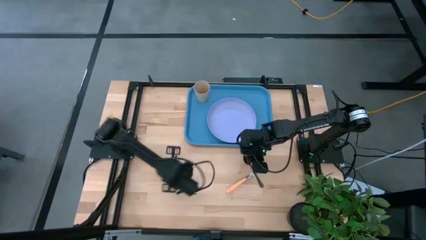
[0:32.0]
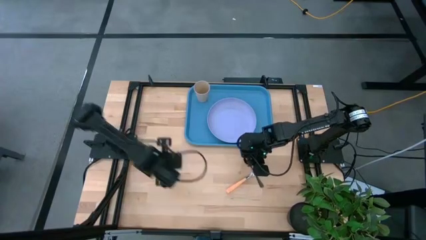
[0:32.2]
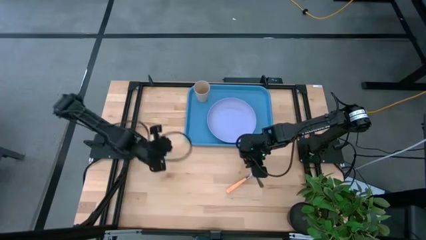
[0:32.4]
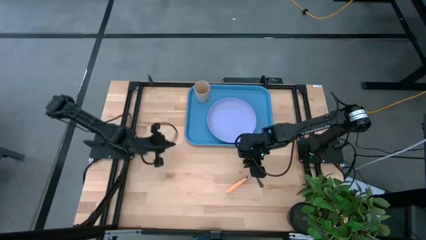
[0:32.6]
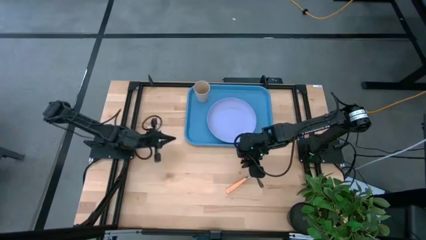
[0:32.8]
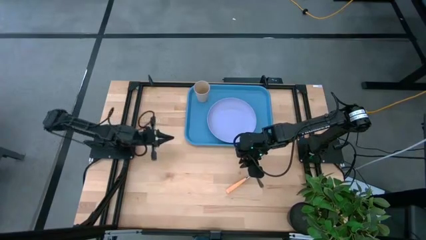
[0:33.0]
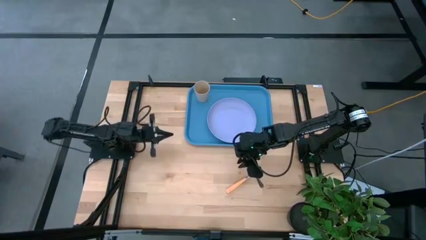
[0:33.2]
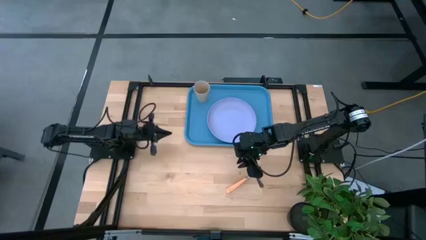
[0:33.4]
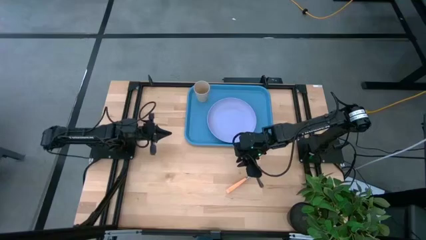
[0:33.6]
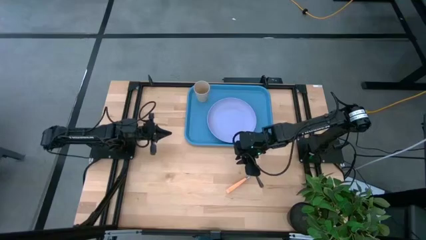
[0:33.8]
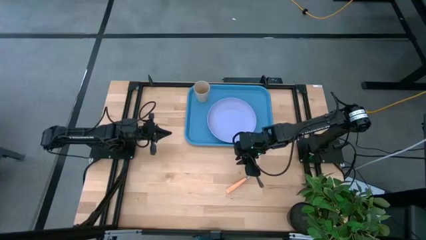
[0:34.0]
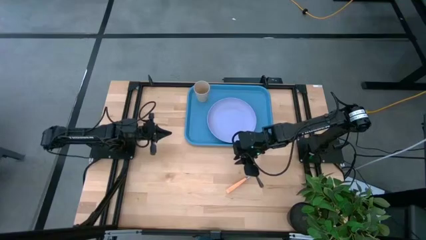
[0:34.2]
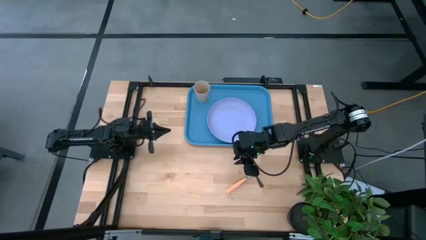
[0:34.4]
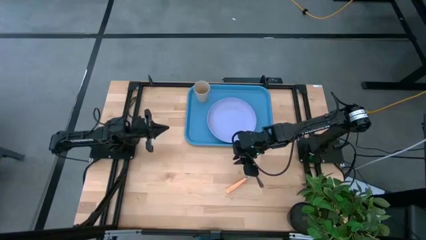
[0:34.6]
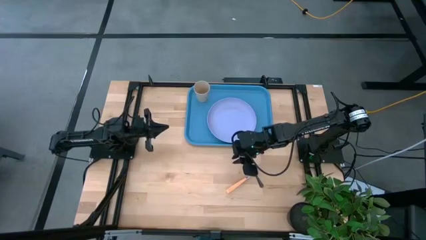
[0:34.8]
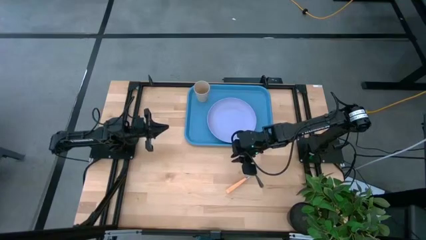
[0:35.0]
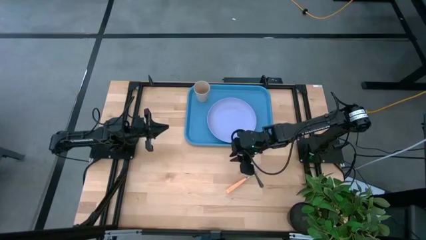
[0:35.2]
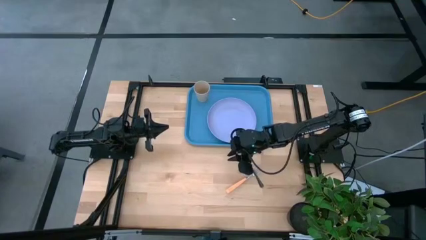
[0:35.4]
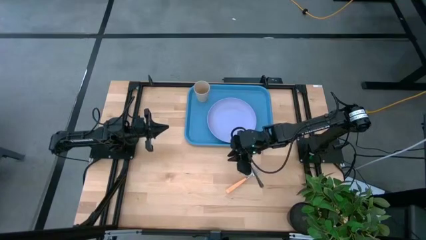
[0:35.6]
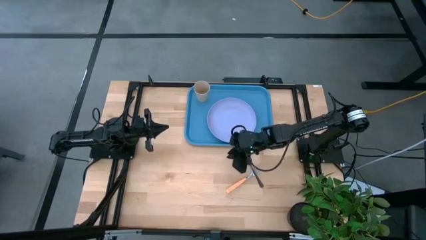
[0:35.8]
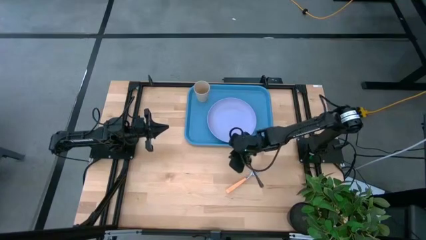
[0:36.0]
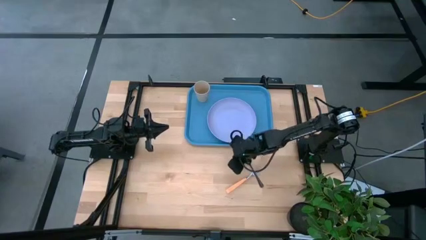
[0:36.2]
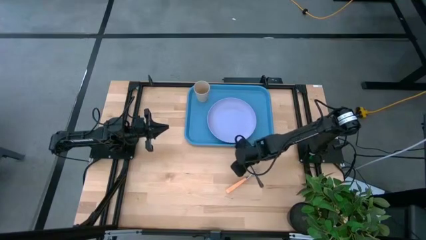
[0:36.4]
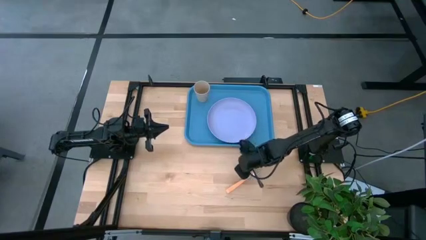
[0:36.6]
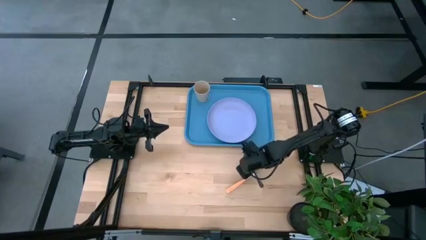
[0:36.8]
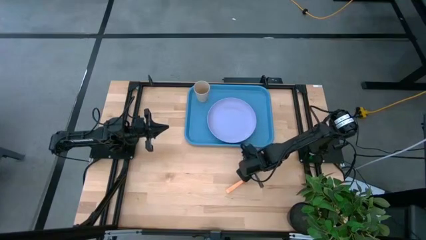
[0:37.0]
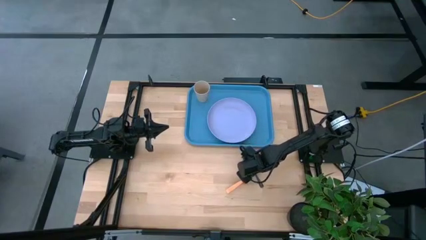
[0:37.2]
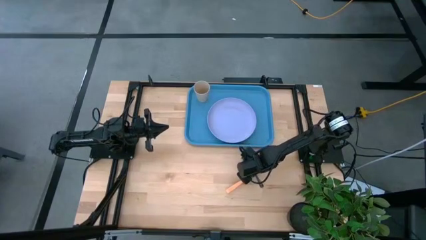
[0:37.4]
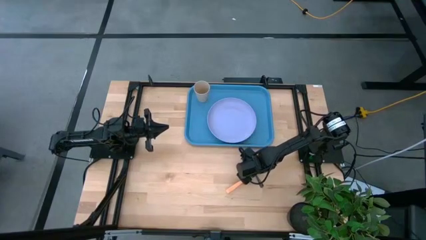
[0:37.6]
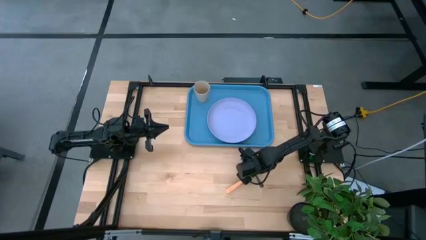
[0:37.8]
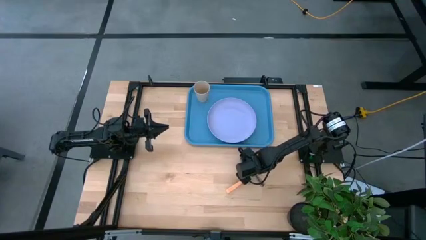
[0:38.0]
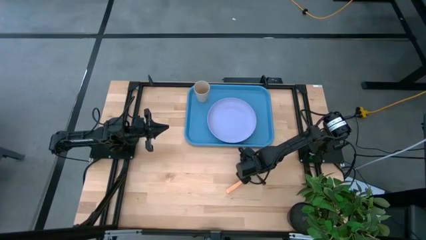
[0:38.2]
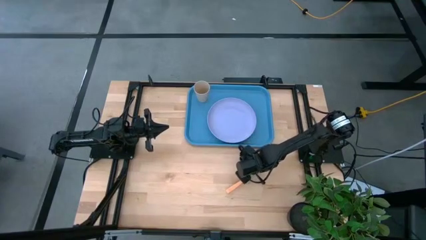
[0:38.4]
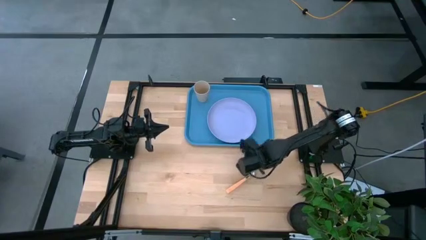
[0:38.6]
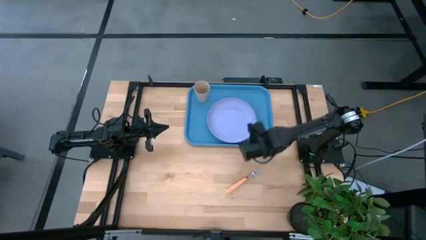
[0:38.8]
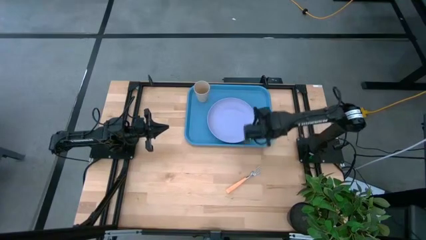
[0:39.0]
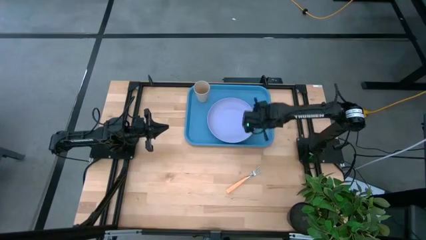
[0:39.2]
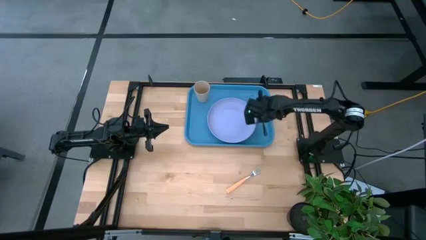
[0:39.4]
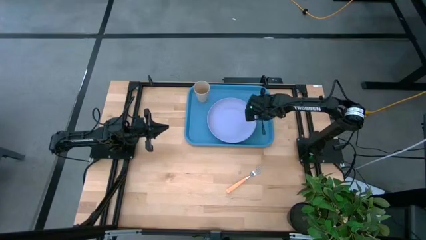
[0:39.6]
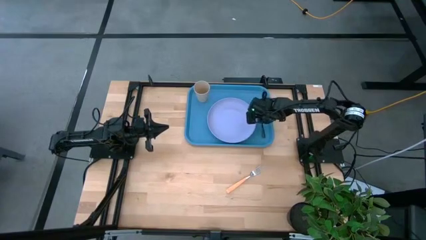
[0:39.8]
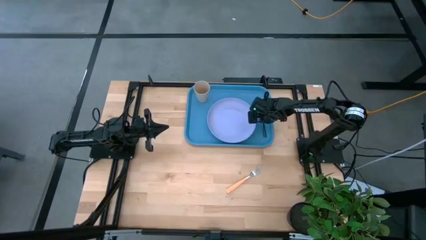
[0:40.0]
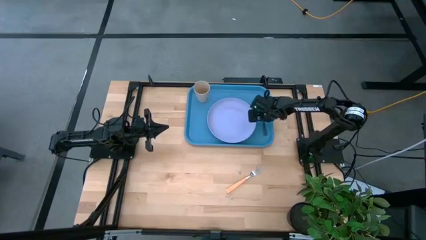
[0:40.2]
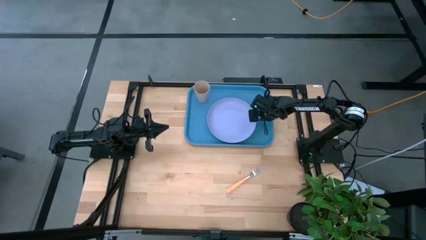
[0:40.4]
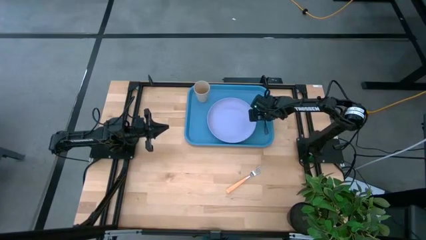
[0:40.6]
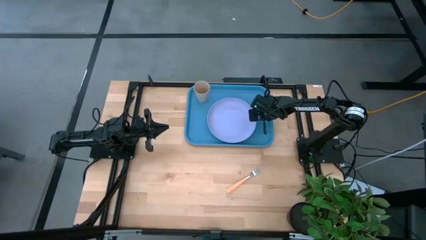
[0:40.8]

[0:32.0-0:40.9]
Task: Pick and place plate/cup/fork/spoon on tray
Put the black spoon on the blue tray to the right of the purple plate

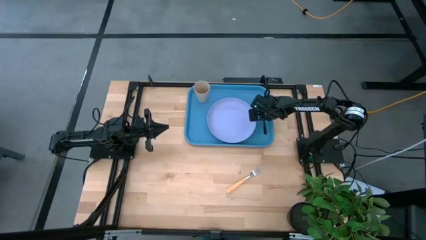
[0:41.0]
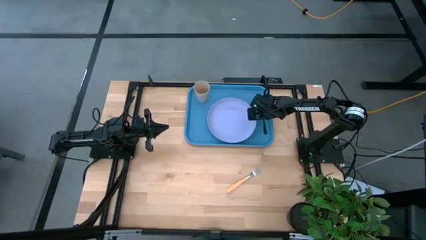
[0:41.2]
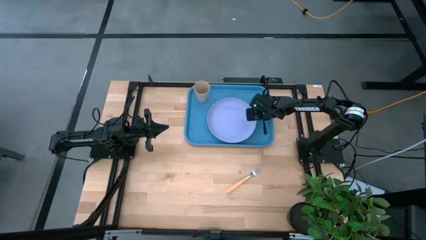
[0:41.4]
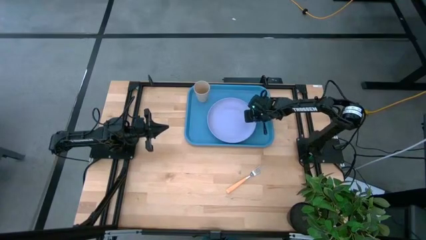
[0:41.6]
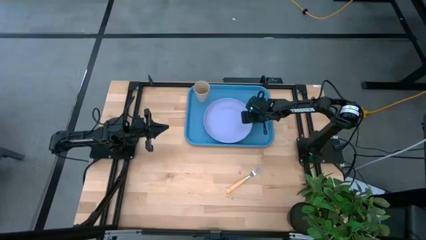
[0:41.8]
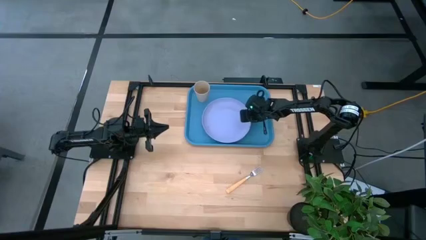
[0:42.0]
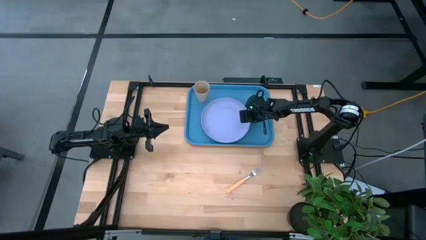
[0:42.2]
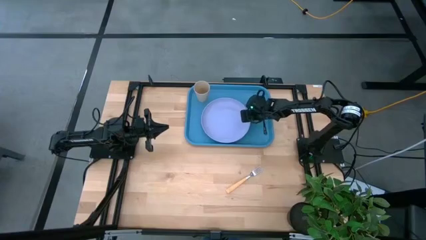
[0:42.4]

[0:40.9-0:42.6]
Adjust the purple plate on the tray

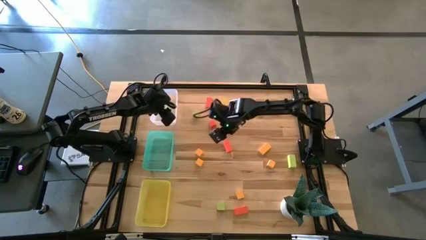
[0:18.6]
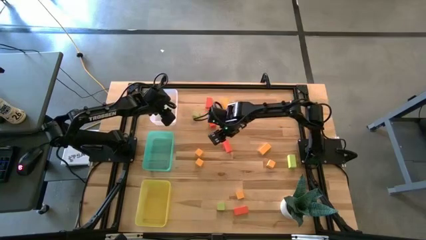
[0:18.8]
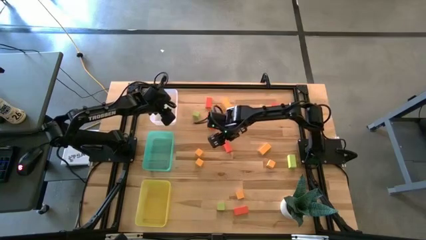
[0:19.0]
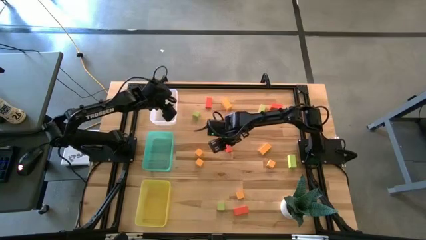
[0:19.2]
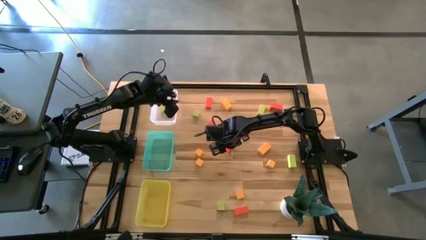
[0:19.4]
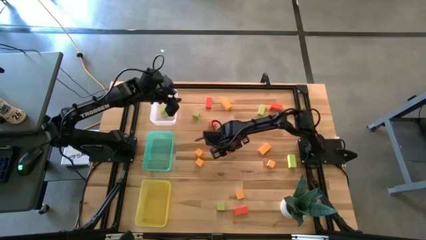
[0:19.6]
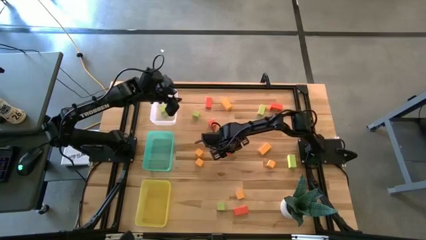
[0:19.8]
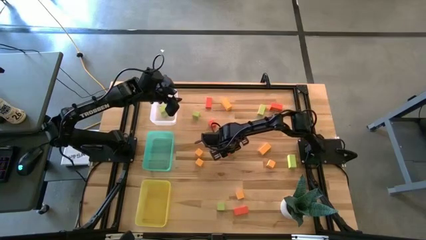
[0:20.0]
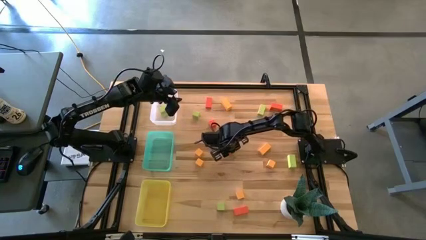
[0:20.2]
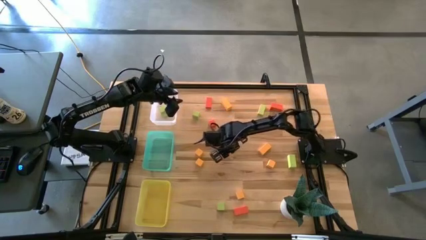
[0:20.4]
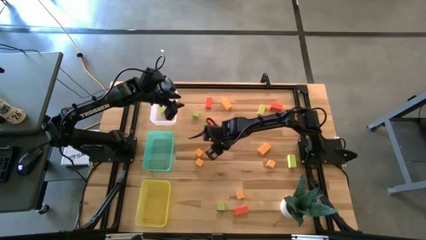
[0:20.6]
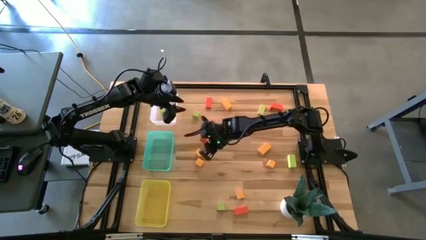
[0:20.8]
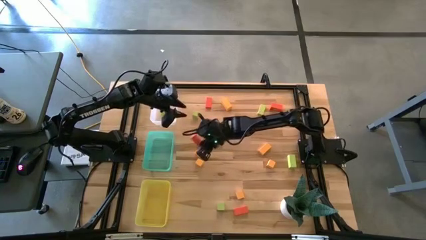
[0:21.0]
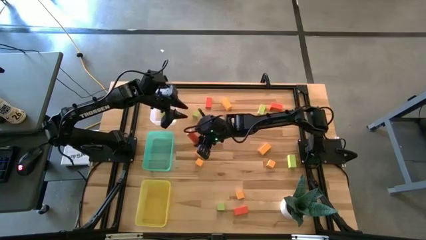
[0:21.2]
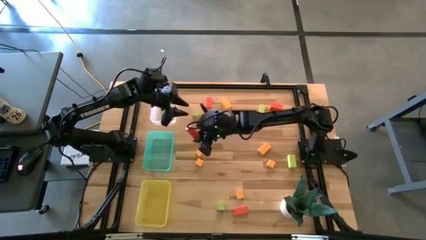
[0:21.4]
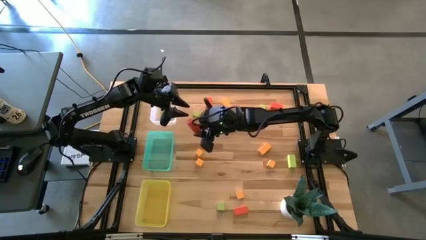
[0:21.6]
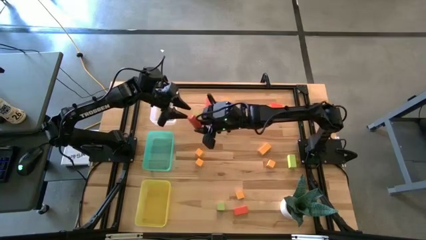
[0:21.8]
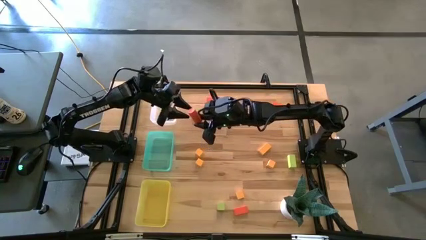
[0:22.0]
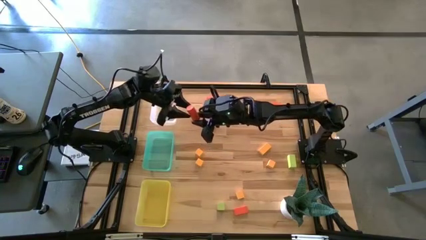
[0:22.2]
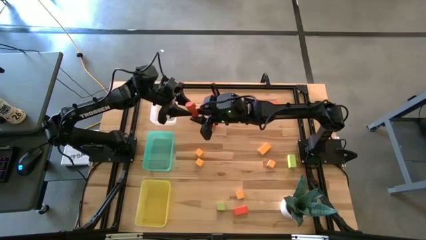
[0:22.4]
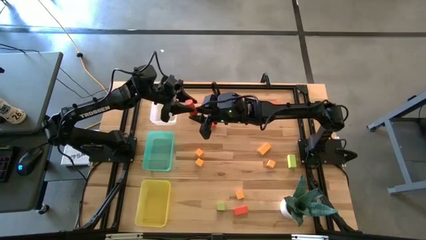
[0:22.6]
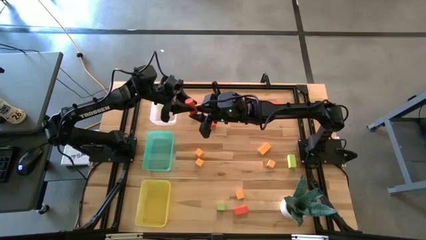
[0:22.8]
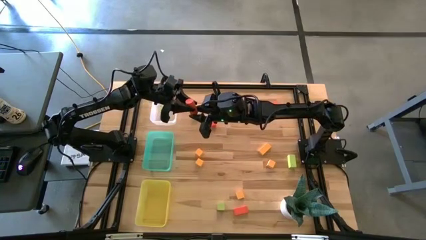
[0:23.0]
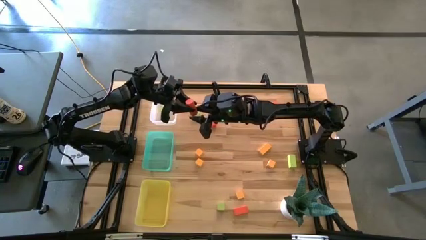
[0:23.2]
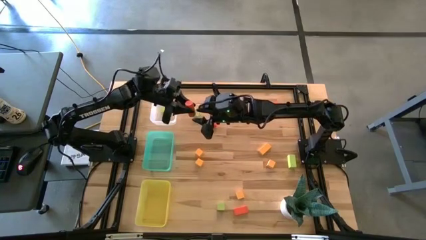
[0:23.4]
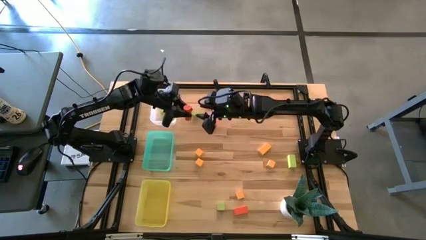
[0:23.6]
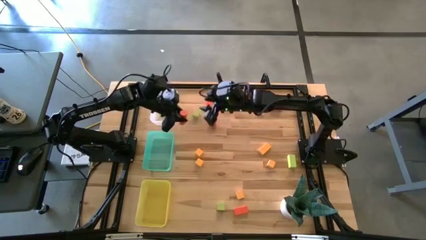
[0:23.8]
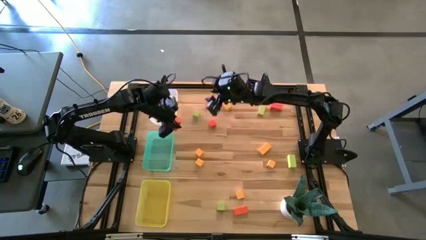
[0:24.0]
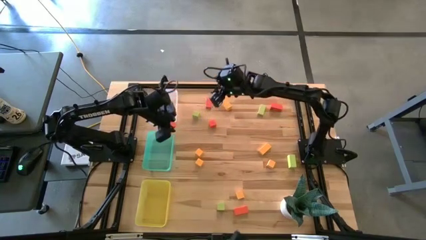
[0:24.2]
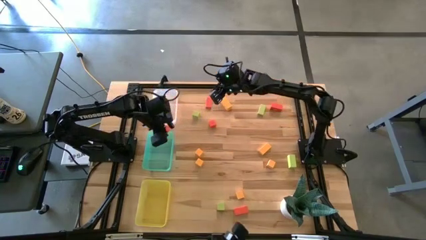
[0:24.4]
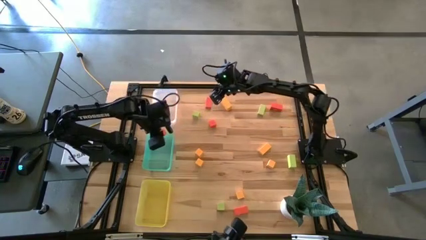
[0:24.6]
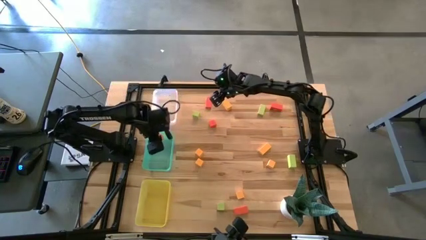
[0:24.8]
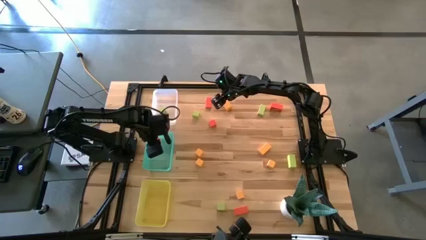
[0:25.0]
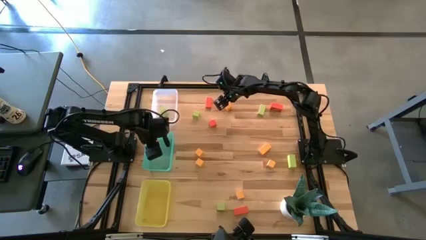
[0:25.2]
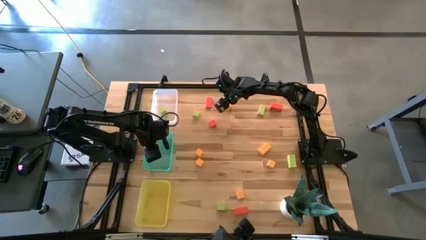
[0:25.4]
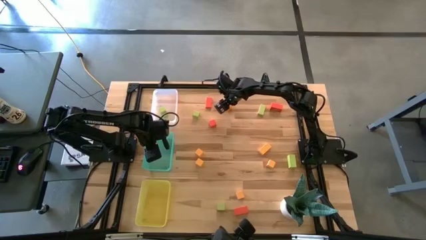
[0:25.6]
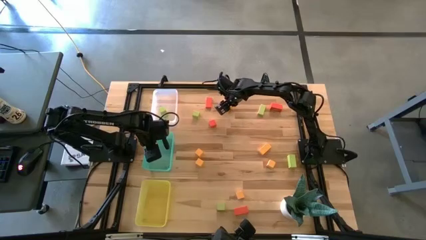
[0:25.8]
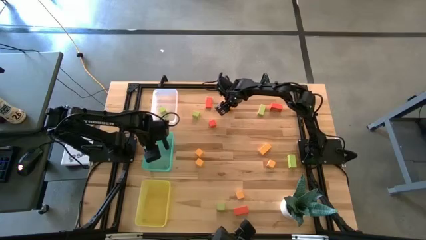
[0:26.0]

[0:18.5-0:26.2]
Task: Sort & place blocks by color
Put the orange cylindrical block into the blue bin
